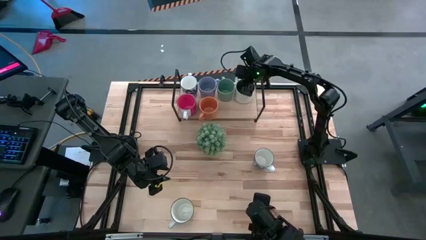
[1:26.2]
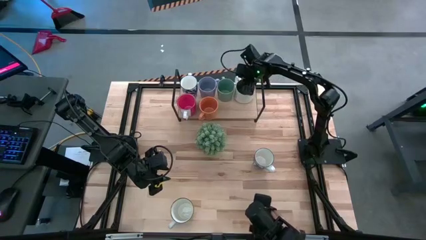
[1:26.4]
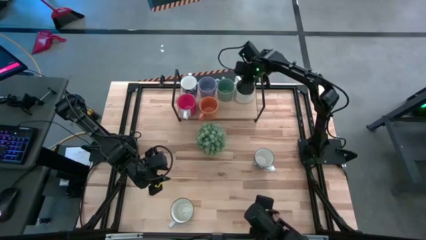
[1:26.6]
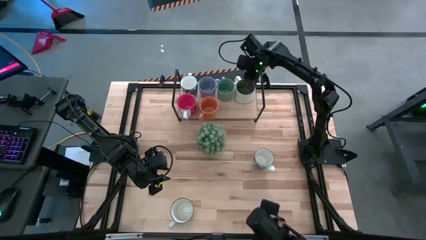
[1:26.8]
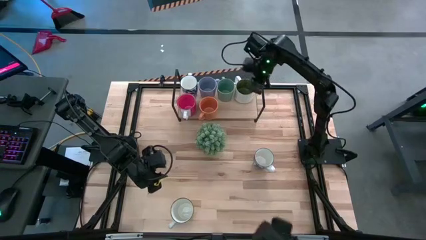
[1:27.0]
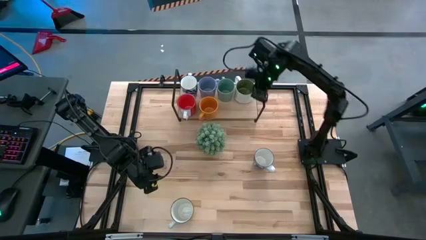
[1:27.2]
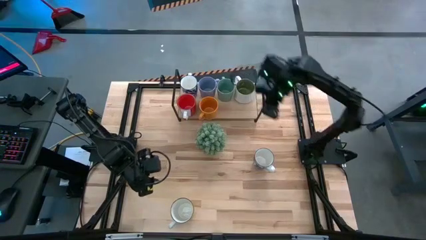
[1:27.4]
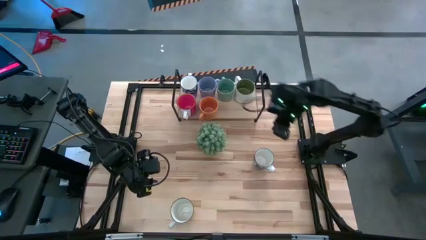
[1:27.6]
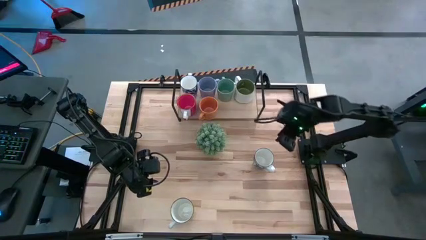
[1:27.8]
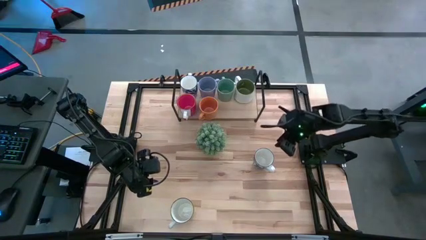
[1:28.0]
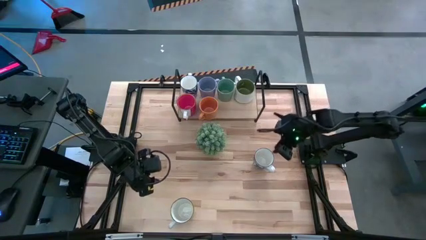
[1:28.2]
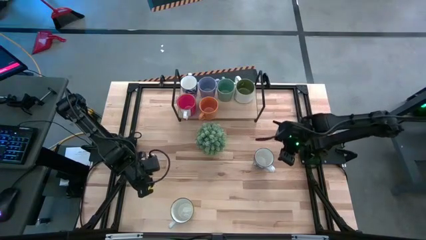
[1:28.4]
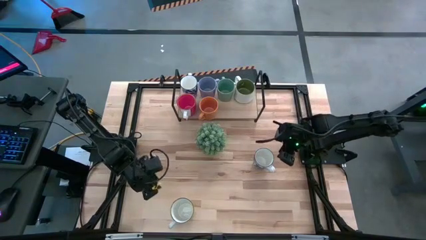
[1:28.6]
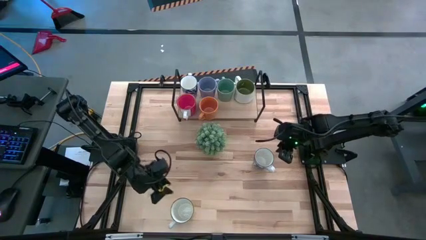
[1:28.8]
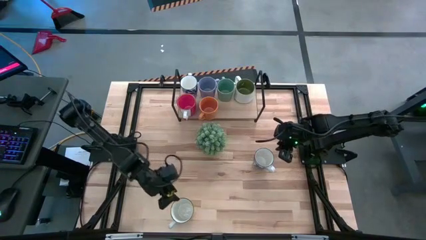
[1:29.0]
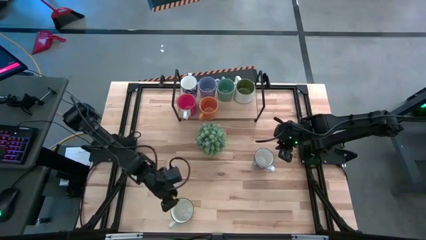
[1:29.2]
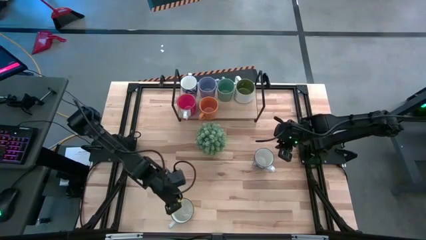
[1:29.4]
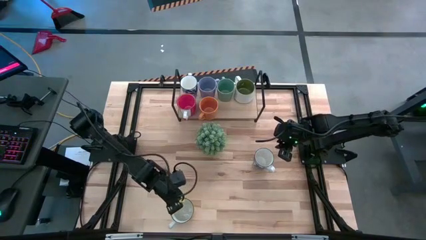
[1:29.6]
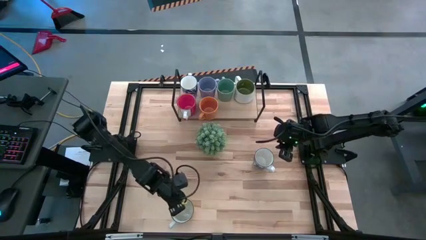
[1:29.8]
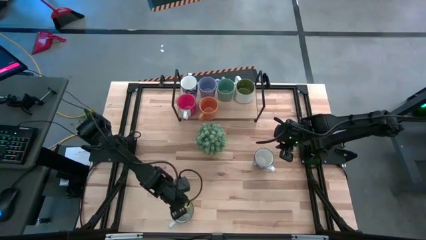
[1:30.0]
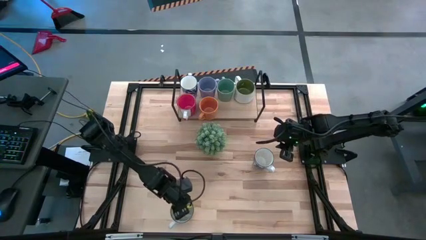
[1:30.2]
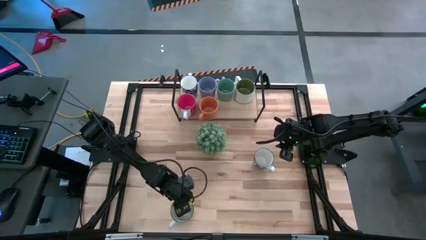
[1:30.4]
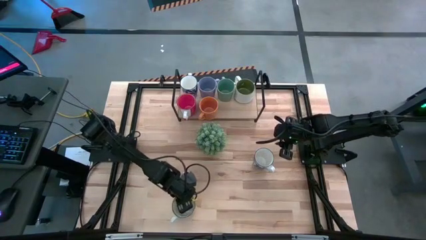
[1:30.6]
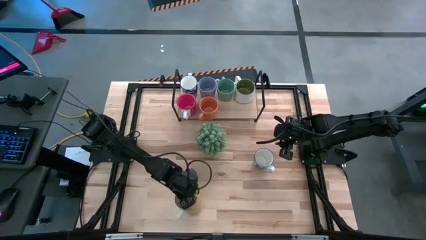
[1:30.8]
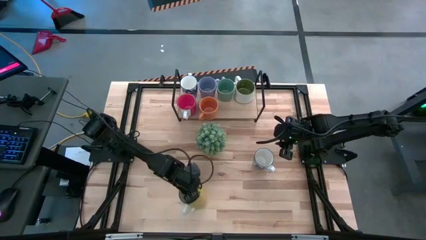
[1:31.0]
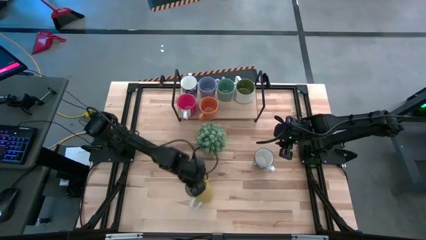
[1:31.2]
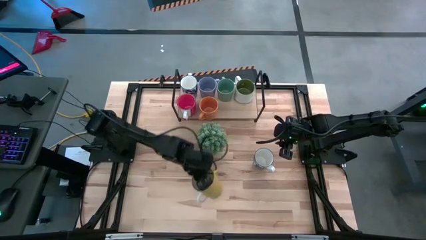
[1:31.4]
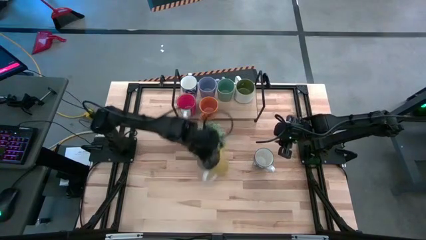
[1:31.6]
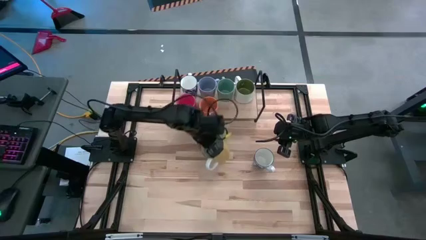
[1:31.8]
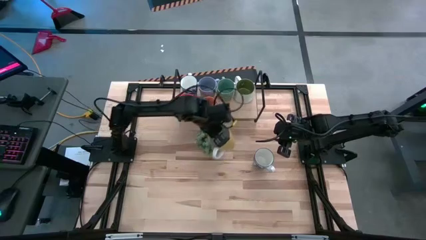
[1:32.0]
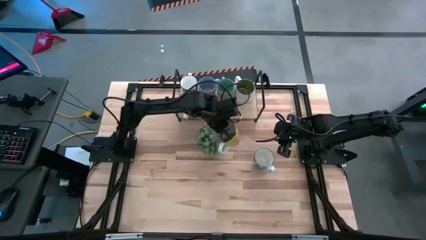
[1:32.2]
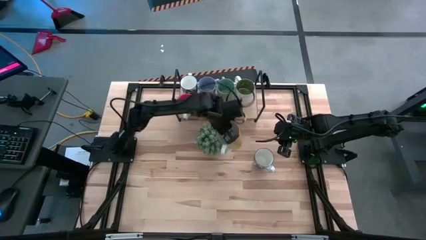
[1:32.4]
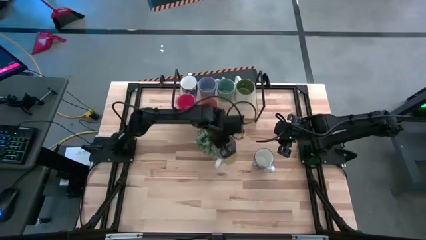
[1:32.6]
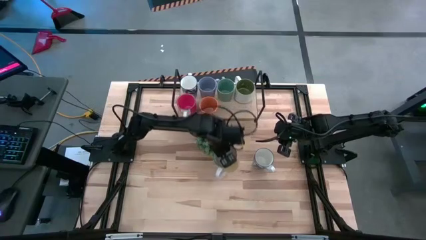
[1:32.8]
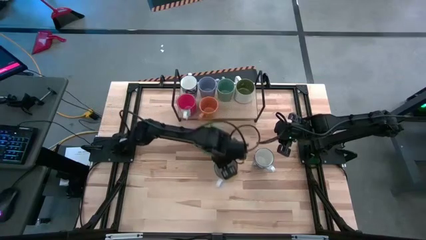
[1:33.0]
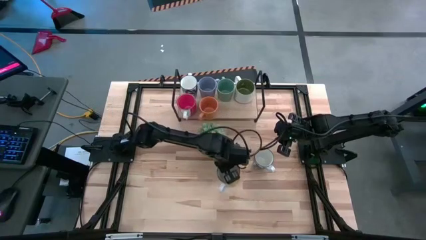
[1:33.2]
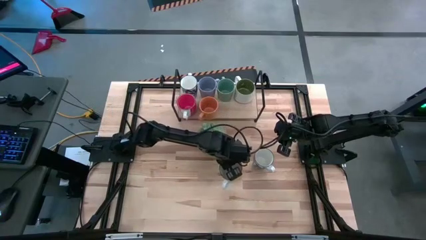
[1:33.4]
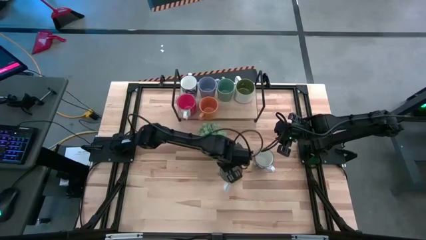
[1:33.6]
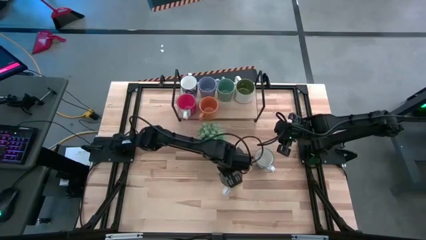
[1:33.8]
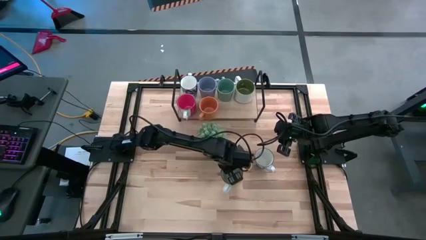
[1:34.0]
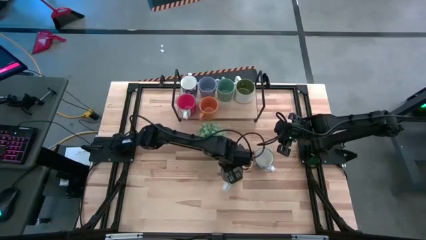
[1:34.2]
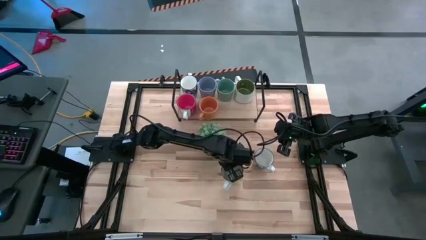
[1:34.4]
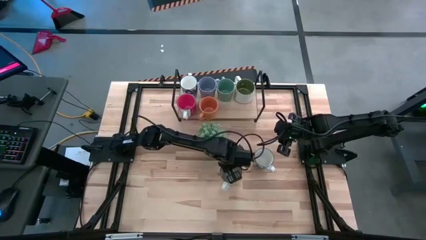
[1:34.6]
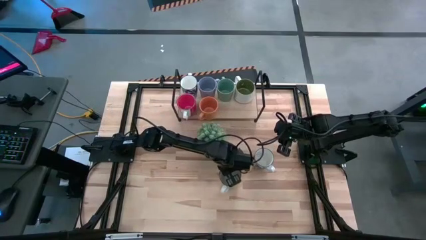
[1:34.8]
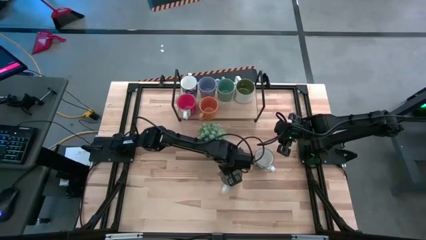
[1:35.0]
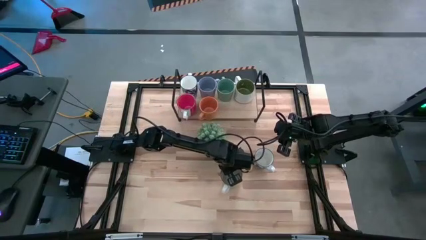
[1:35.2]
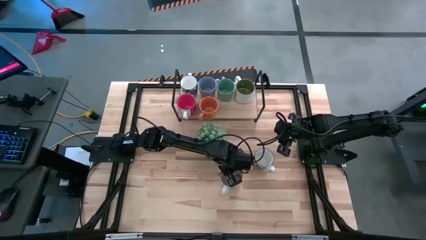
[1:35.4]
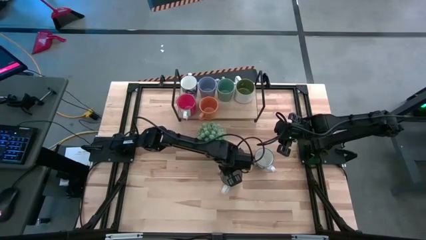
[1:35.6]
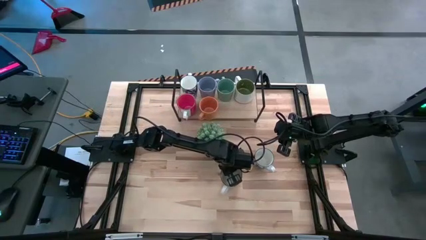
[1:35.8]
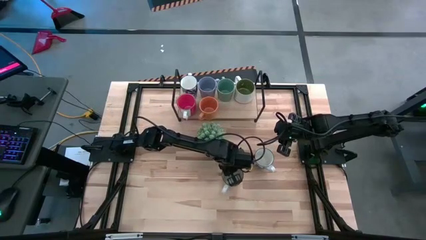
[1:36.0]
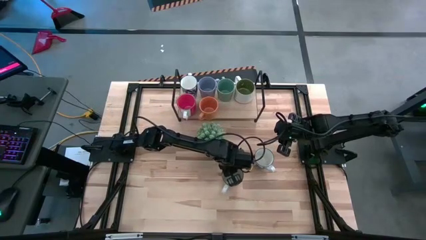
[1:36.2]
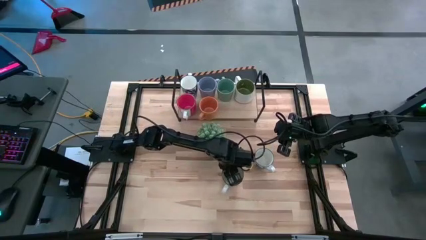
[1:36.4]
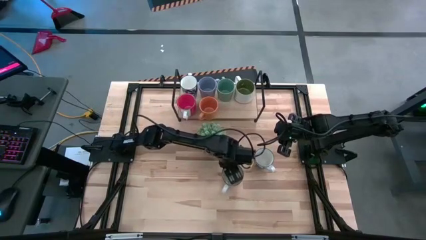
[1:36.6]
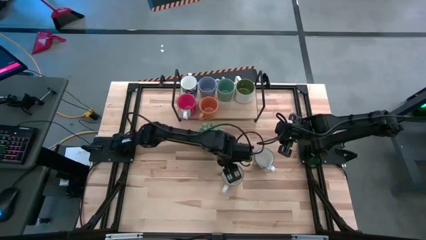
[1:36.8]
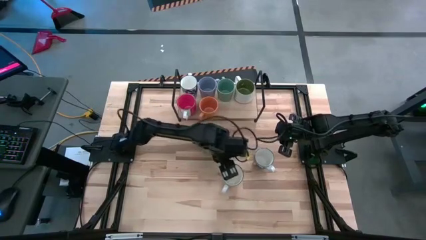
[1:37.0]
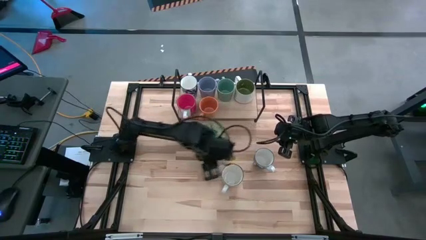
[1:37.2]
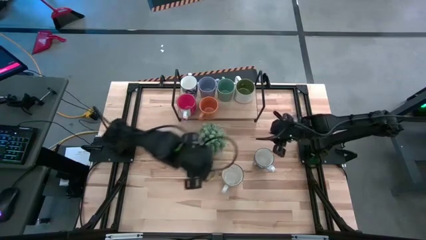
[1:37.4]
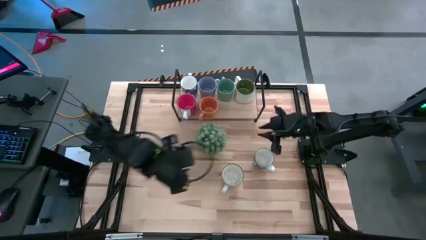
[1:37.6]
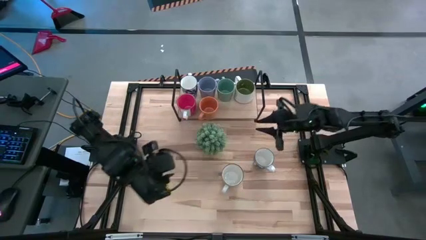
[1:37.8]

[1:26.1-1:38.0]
Task: Place coffee mugs
Put the yellow mug on the shelf
